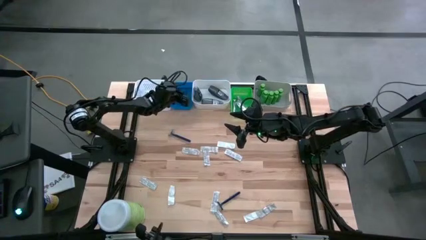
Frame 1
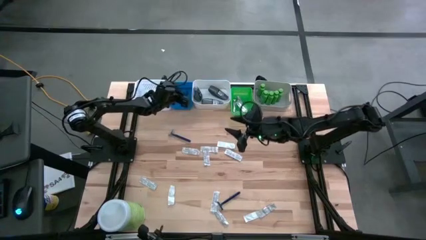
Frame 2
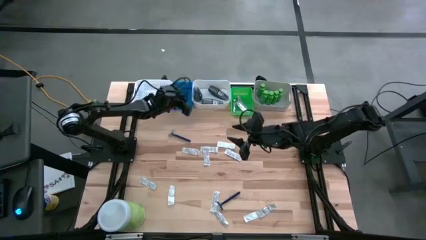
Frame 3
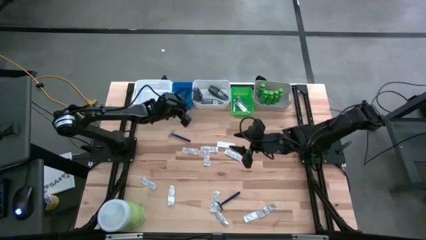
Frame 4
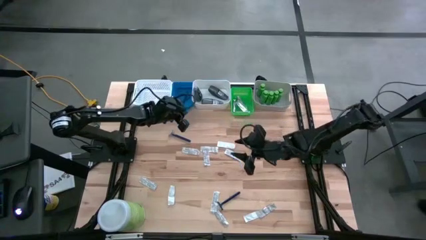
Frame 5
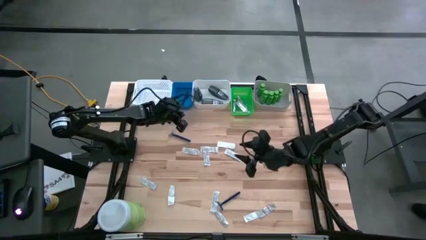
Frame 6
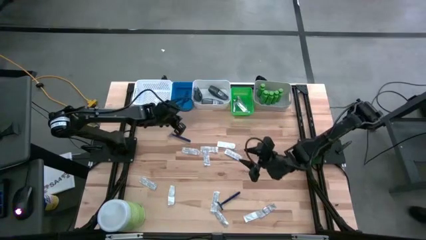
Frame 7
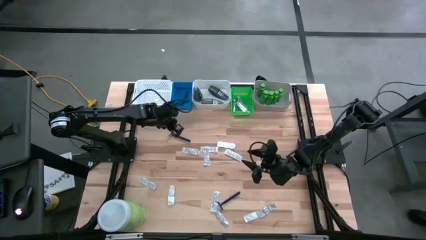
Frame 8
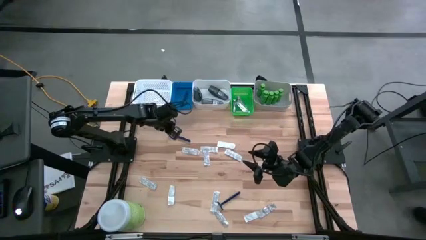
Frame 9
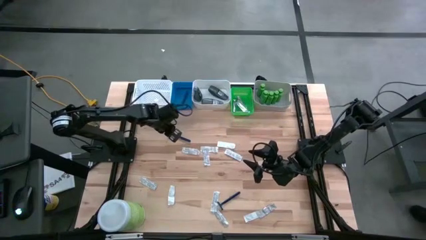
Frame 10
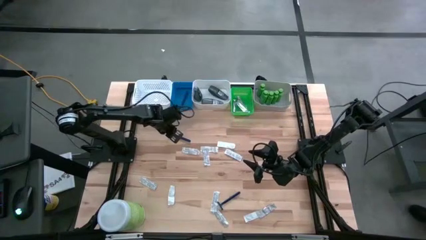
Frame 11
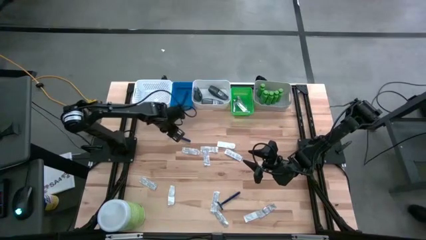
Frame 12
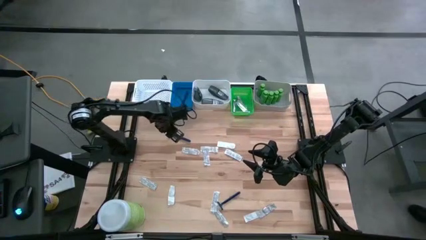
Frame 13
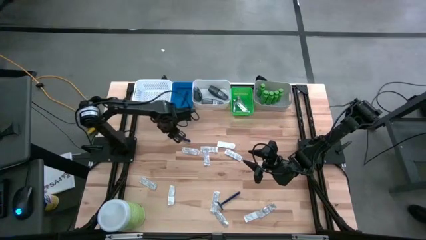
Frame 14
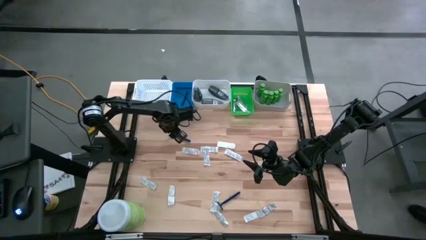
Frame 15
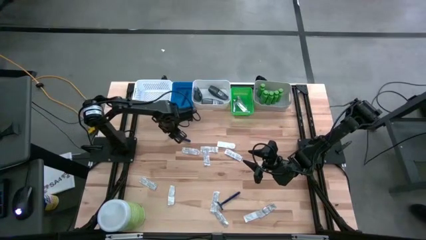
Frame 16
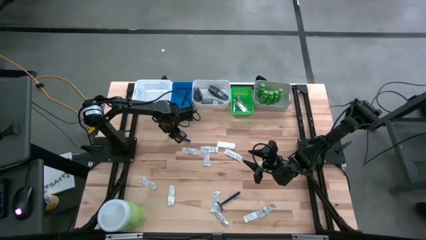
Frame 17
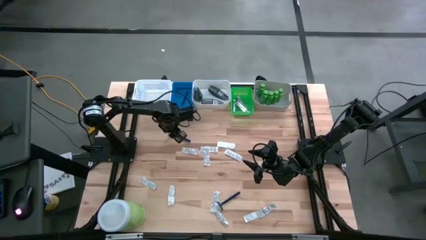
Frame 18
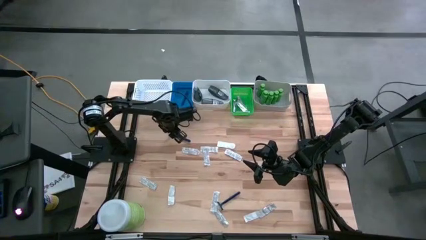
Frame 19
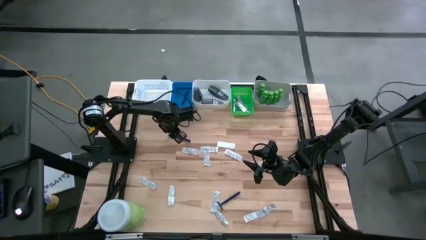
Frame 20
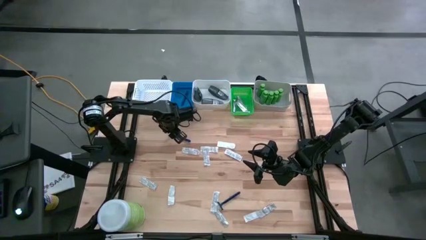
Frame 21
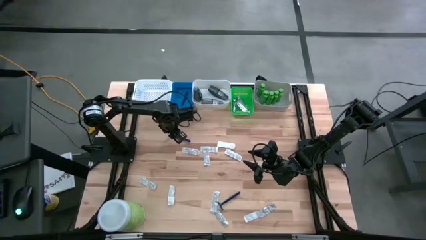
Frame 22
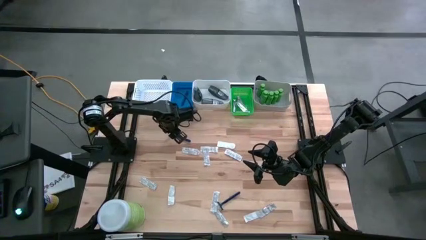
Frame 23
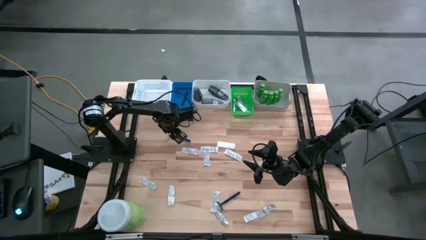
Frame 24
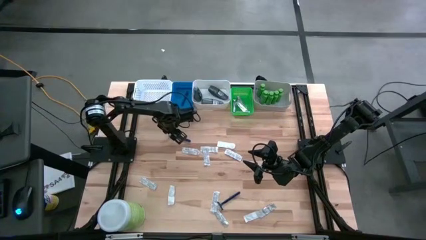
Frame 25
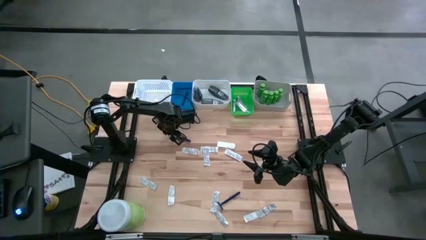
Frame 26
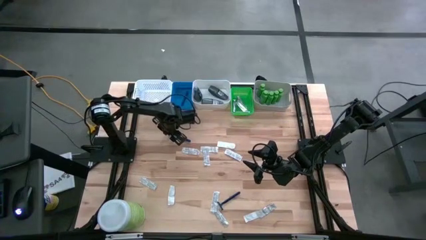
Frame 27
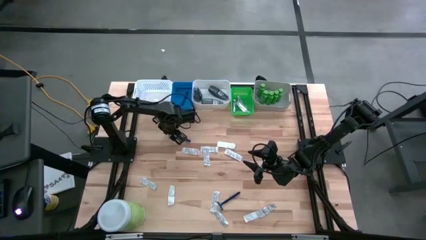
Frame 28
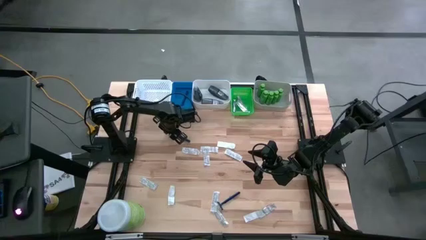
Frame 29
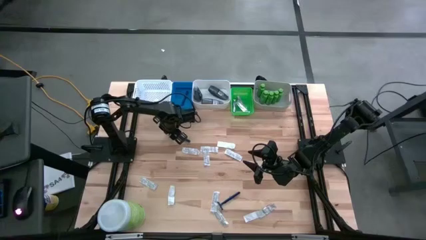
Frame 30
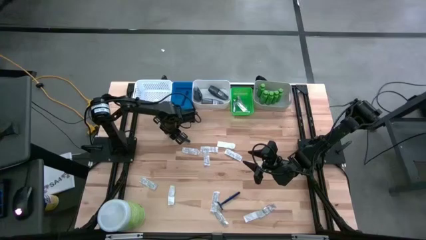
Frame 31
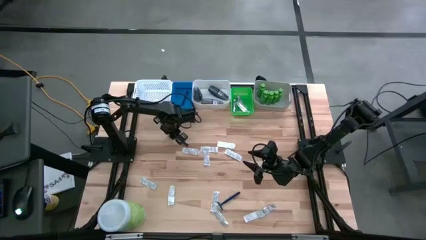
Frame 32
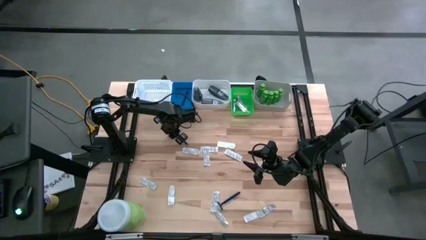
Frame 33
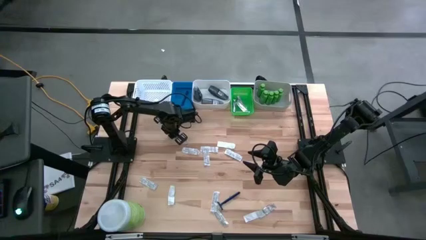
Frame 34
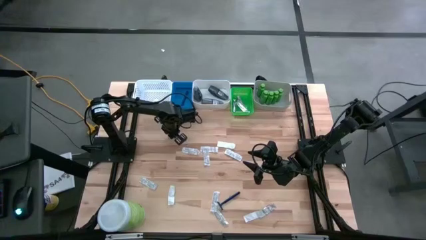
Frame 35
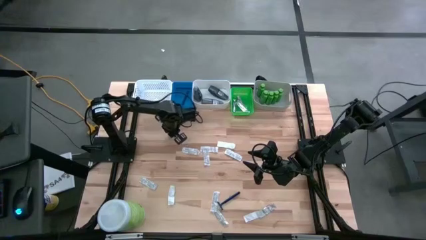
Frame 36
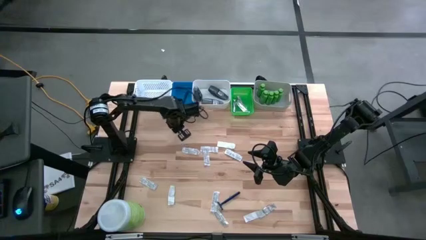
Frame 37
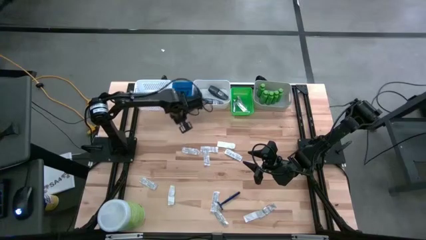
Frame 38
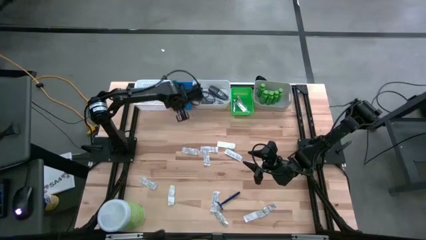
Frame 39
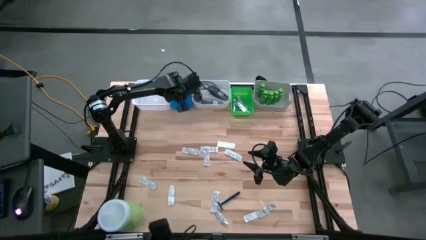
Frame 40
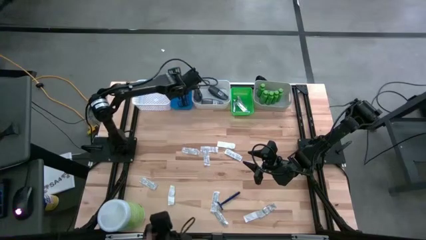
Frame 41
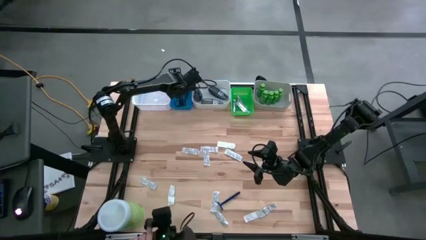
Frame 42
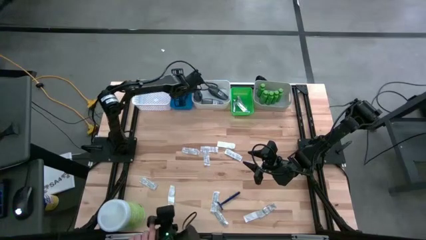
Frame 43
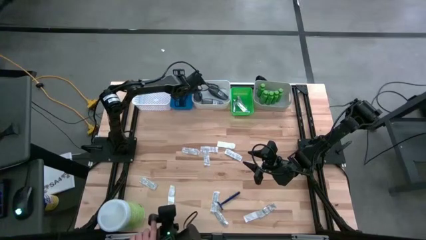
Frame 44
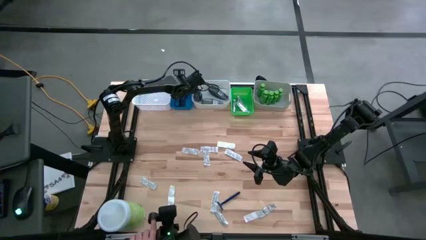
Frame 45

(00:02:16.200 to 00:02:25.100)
Task: Pick & Place Travel size toiletries
Put the razor into the blue bin

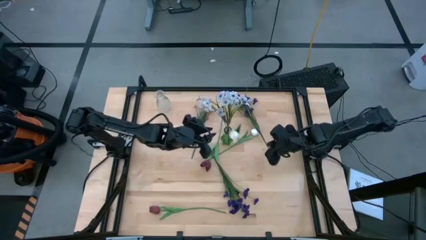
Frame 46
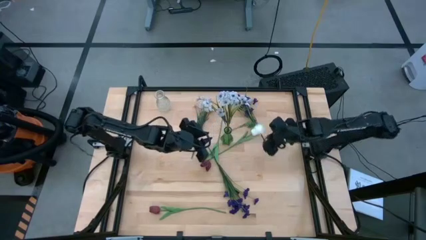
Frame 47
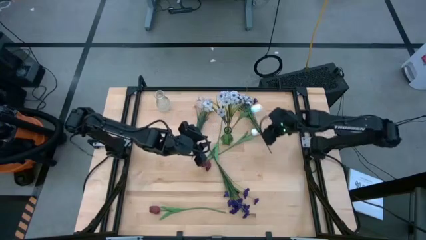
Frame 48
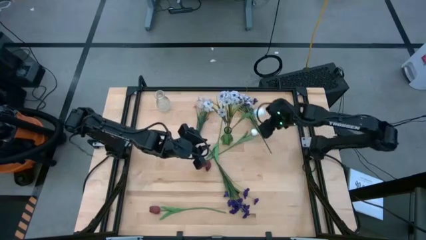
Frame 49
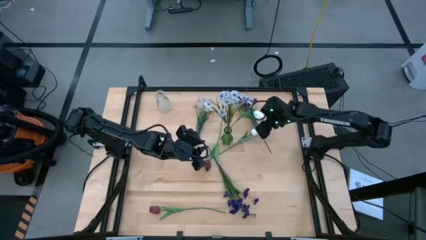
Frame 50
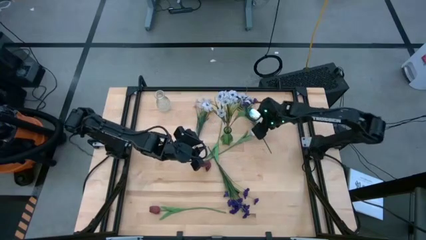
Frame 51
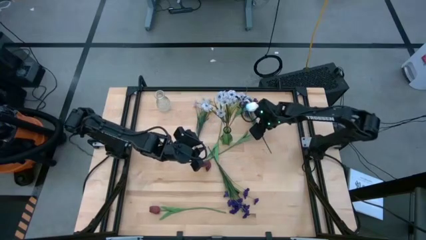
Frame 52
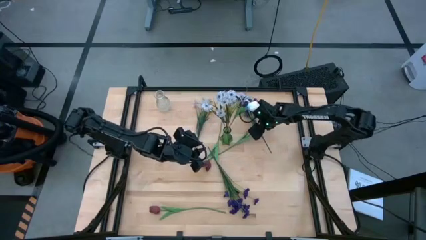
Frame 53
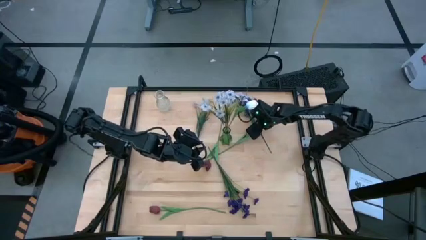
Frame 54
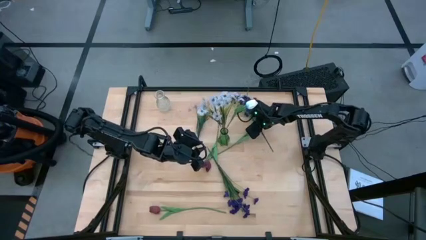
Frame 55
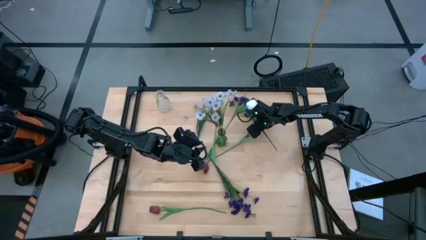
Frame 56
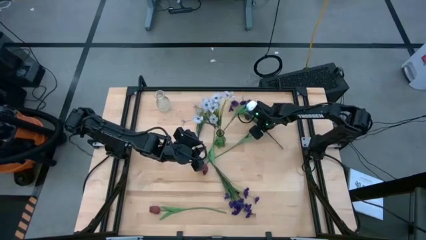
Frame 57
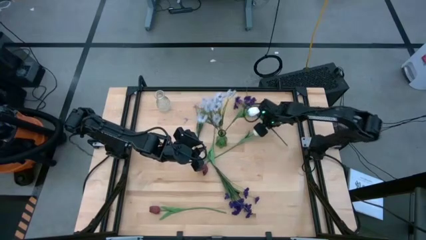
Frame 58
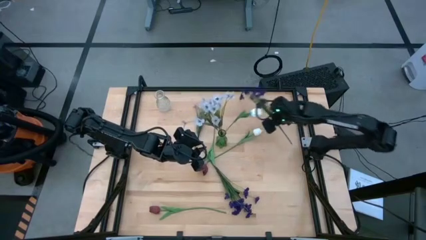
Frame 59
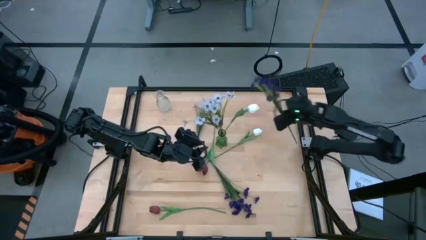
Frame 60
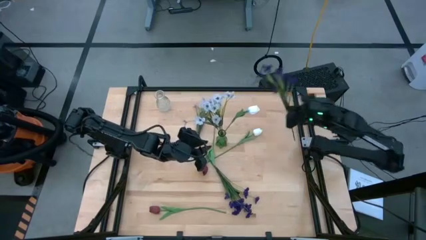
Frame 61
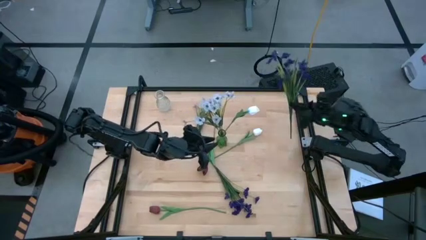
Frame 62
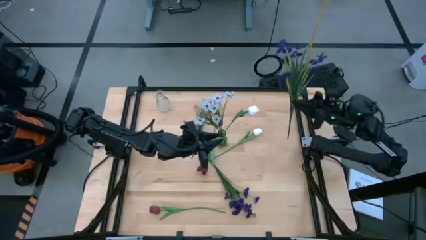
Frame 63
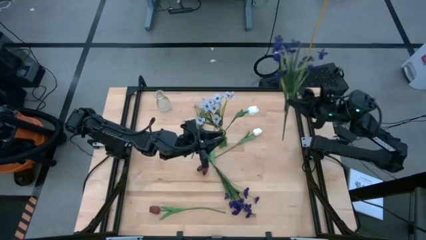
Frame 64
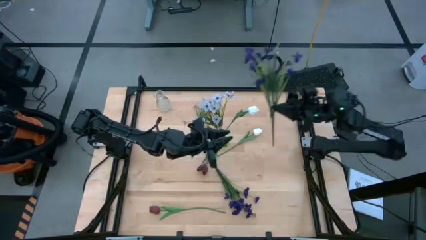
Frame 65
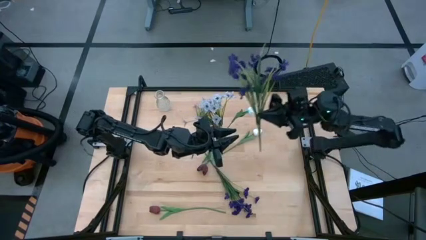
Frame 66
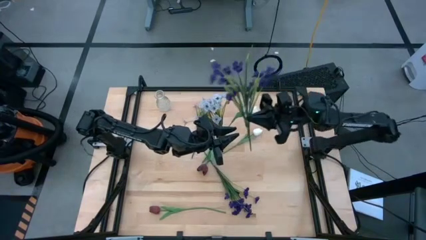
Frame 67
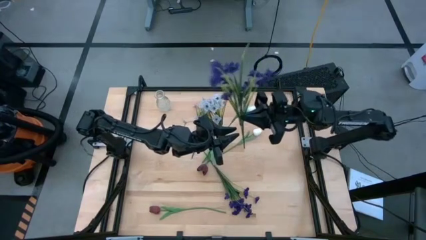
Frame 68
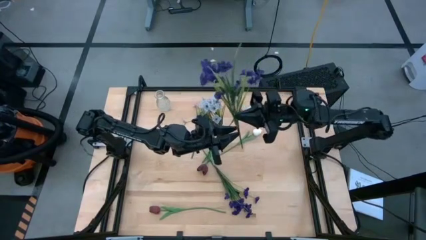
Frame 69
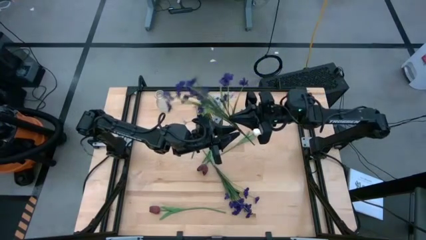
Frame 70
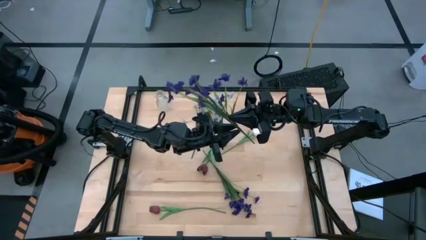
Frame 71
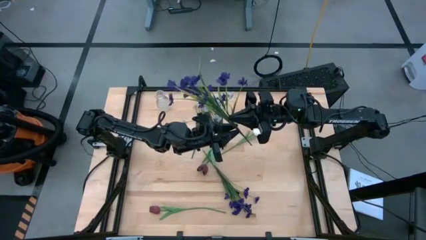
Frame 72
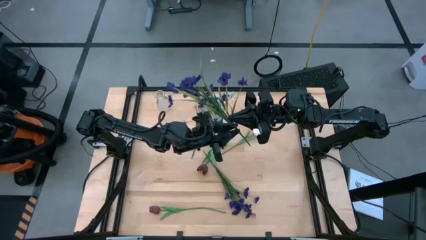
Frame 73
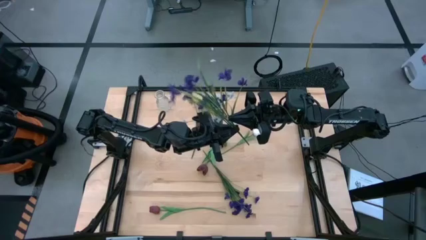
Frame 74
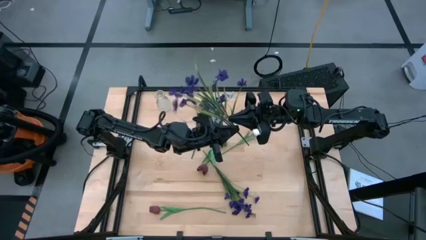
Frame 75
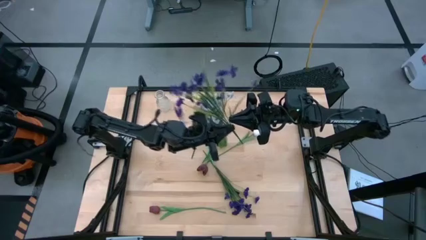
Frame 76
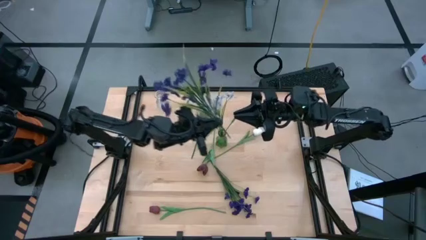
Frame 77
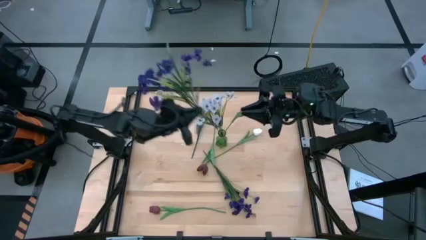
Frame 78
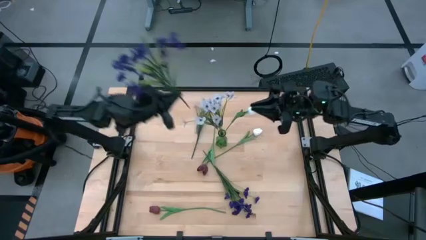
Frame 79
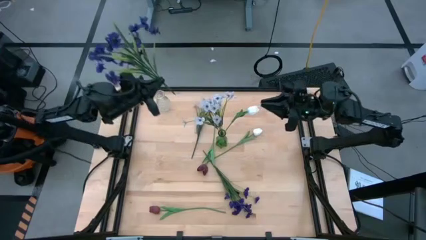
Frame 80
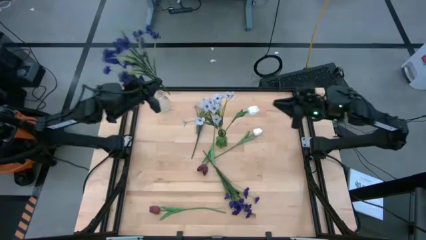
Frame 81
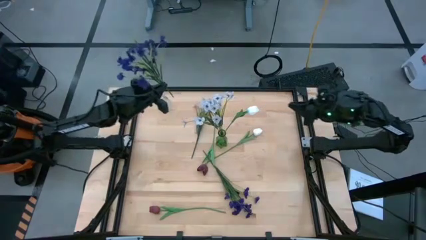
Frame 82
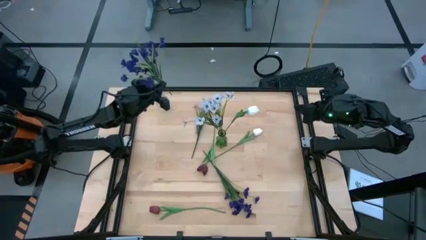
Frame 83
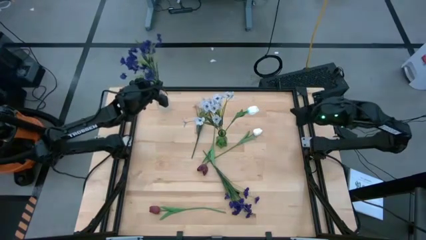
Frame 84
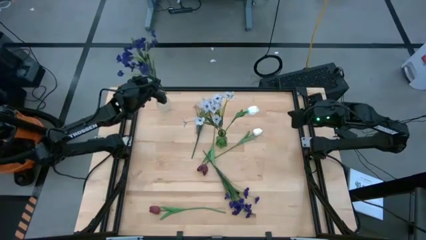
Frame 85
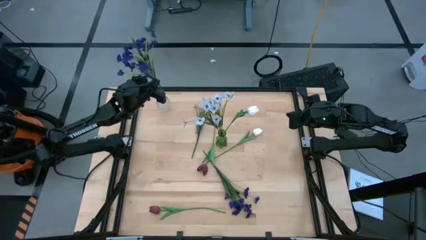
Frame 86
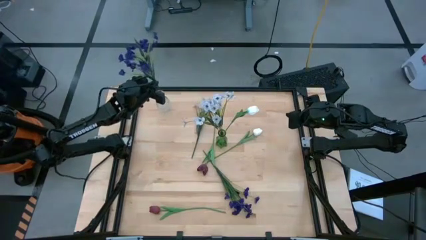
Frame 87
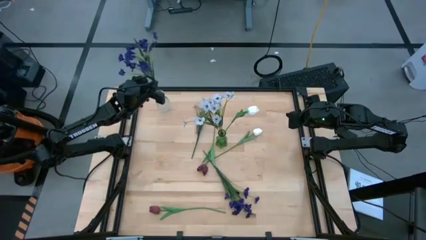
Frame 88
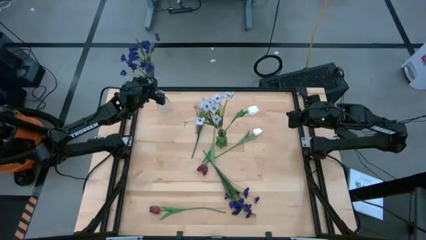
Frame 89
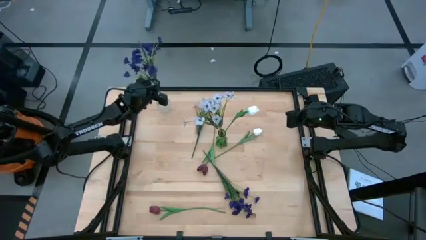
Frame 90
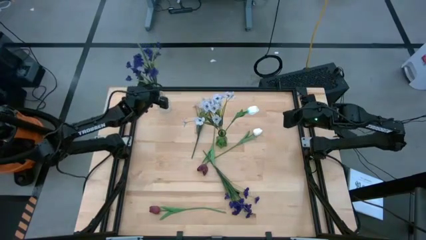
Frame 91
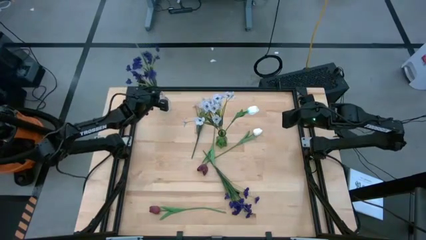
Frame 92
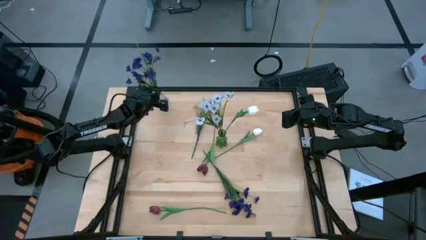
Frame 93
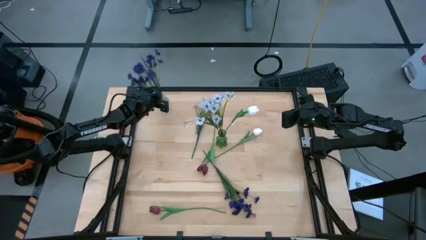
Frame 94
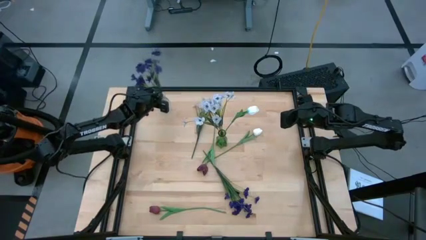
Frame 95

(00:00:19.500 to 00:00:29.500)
Task: Sort flowers into vase by color
Put the top violet flowers into the transparent vase
